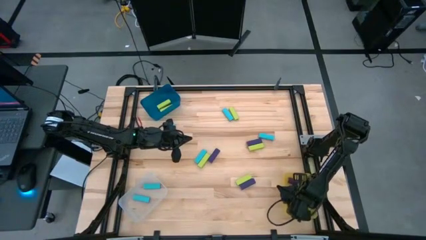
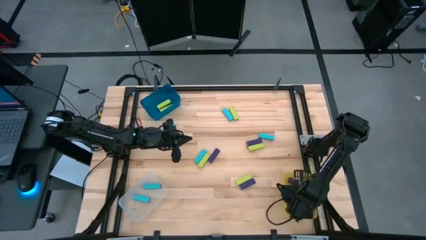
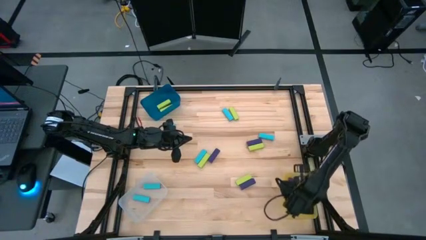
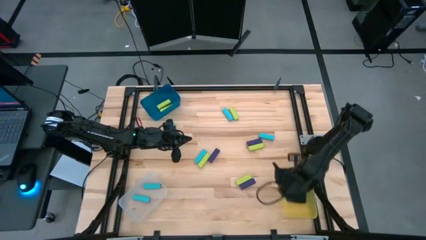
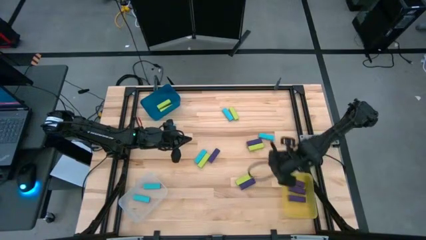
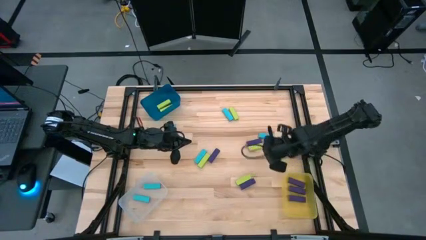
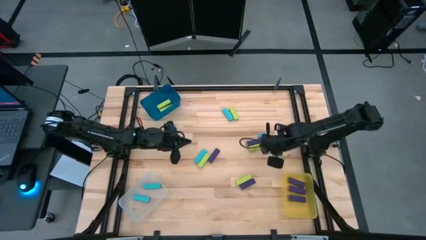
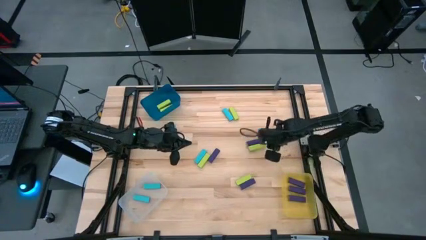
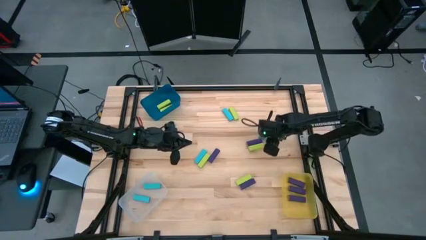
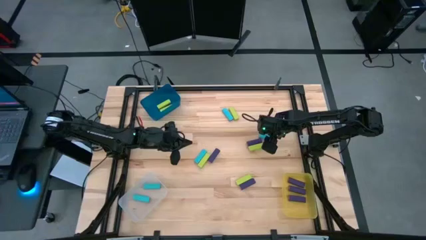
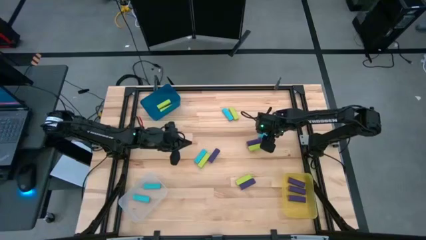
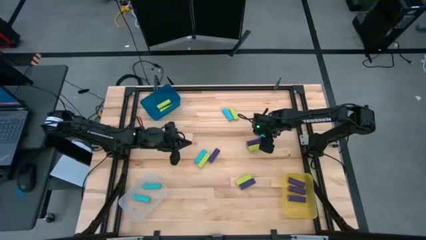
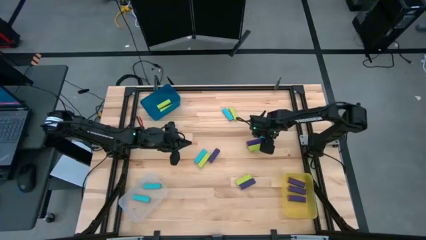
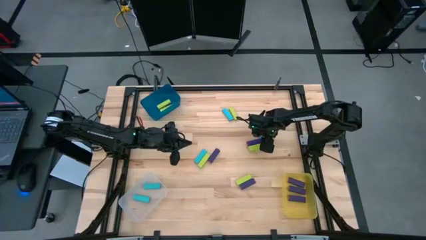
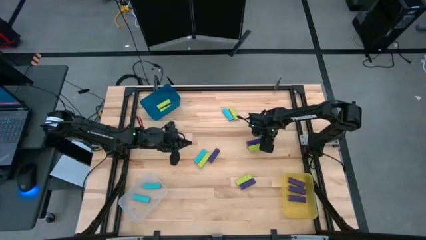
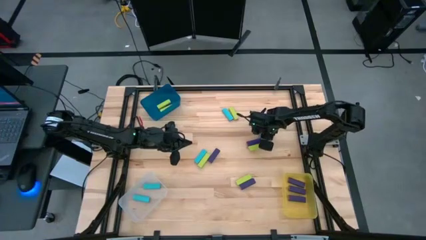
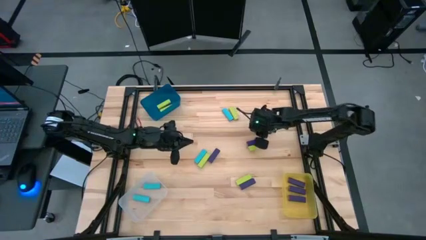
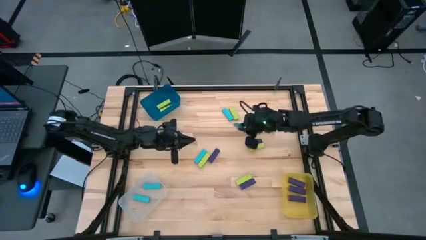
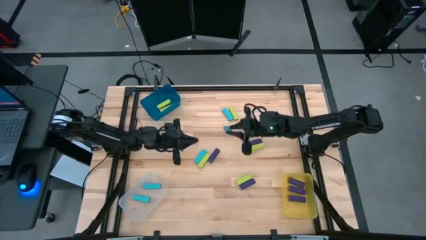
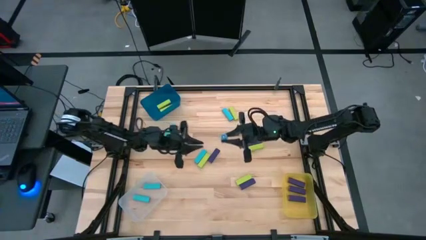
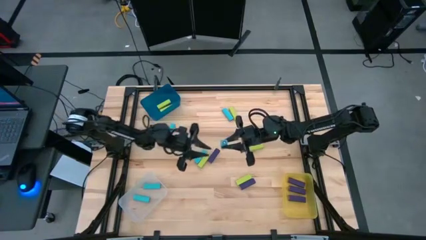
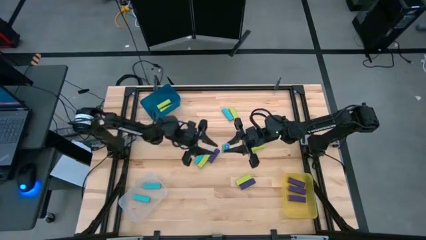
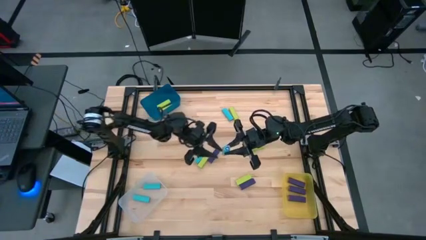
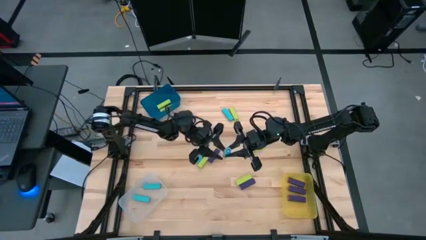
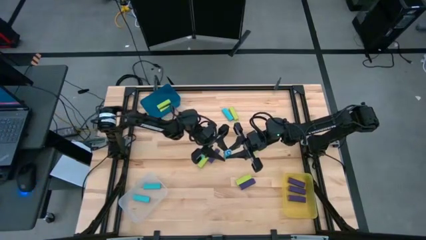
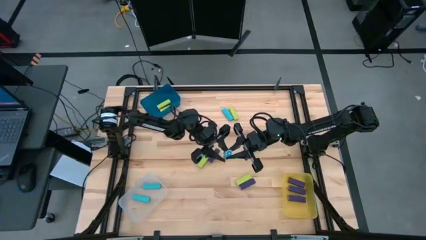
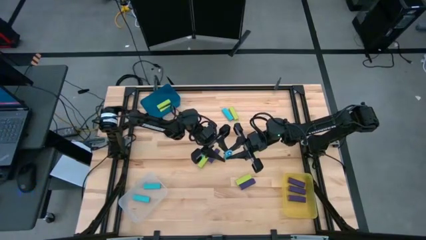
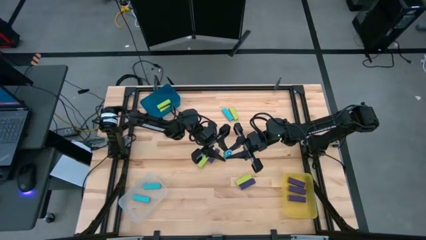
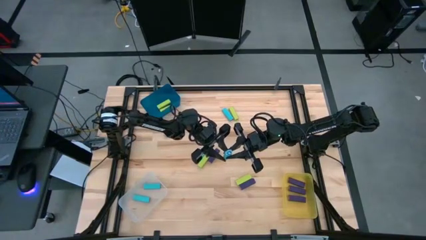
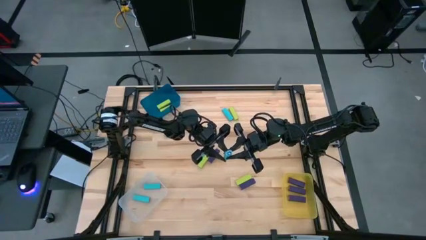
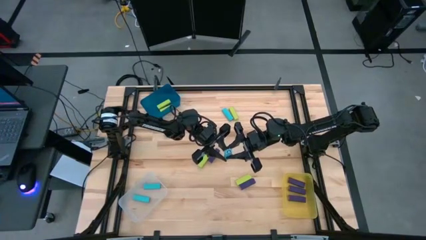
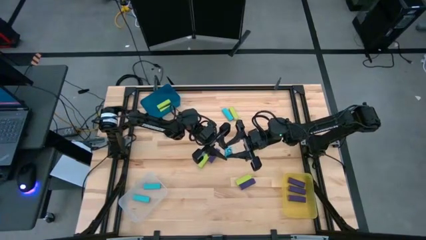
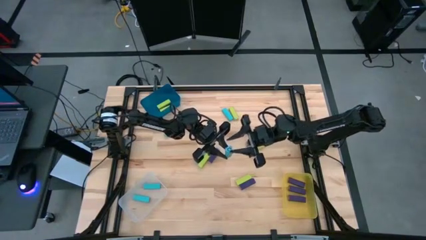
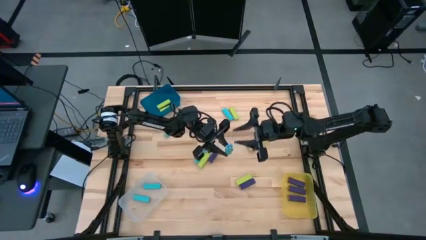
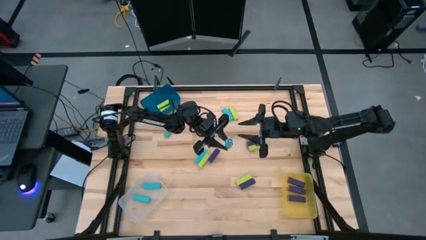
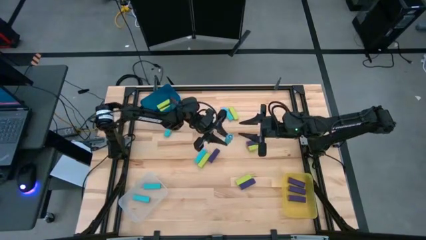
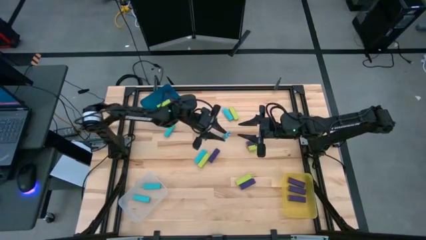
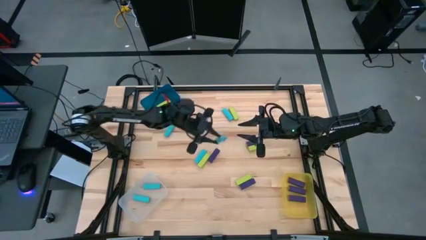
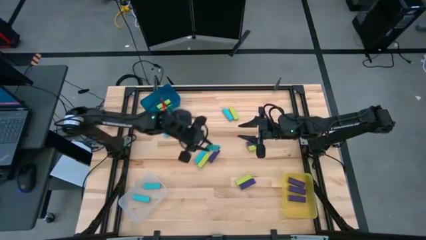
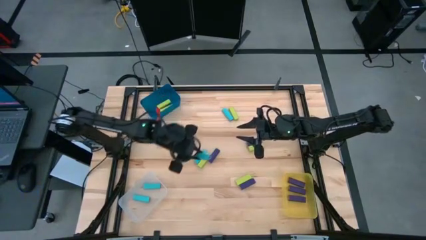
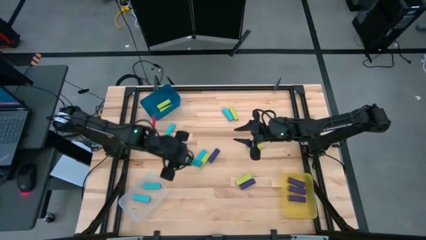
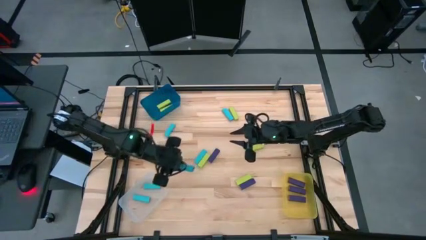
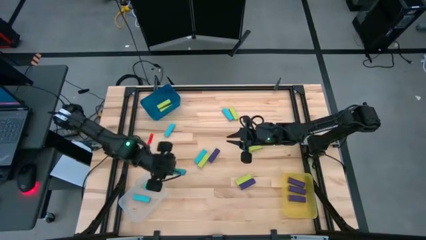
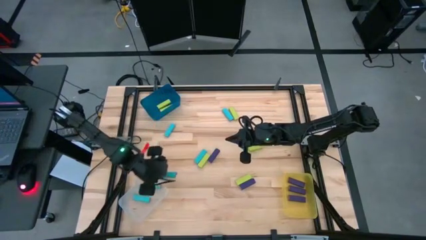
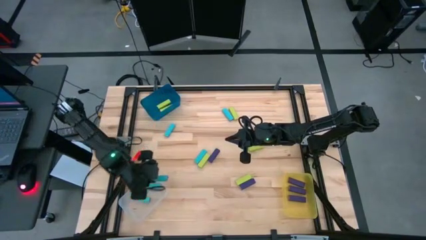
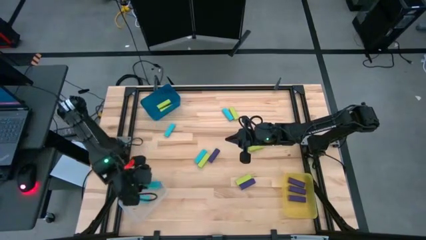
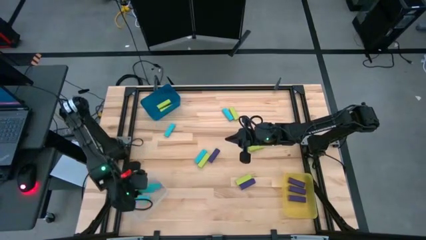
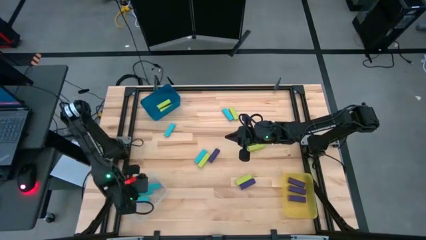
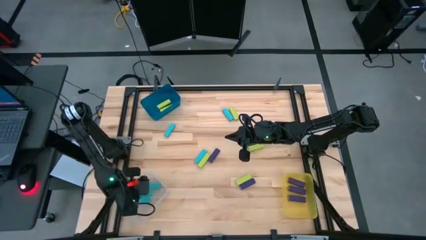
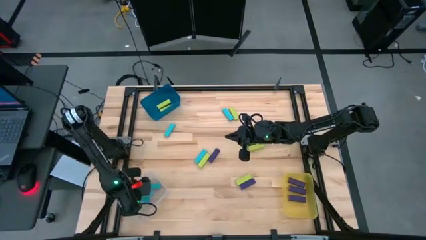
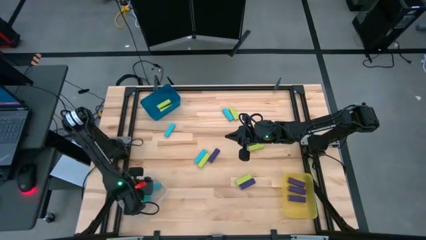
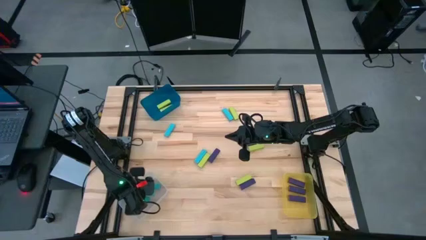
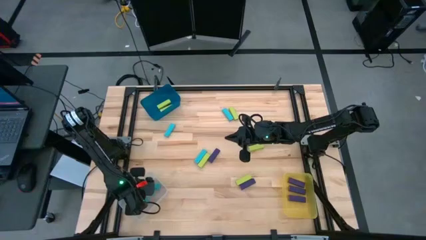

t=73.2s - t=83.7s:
Task: Sort blocks
Put the blue block into the transparent bin

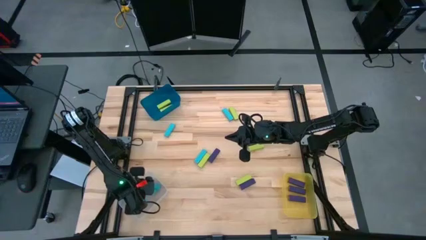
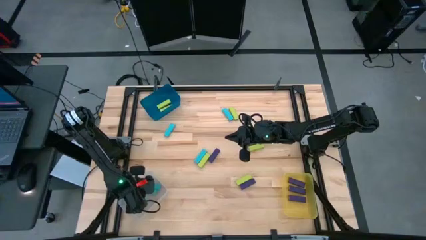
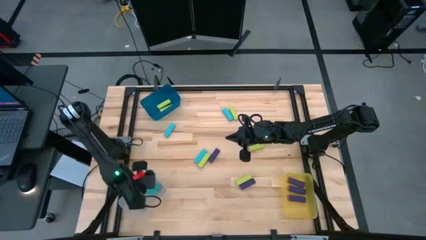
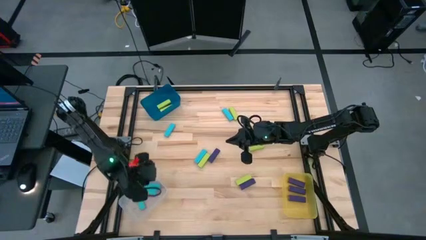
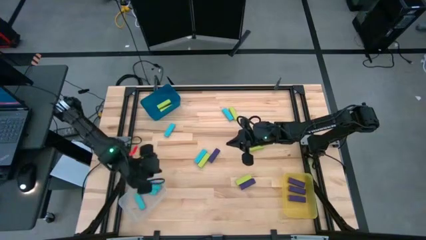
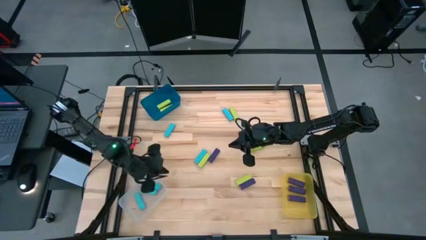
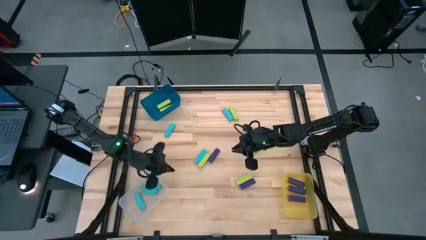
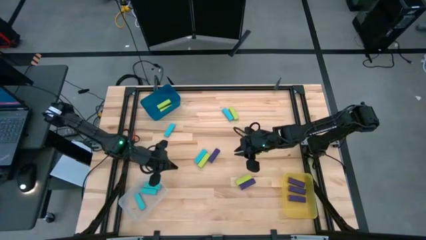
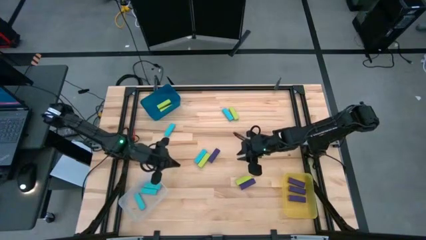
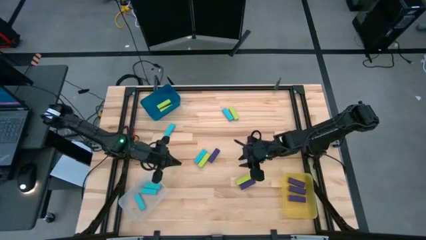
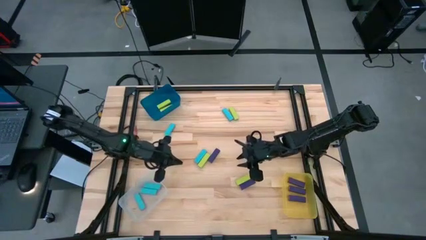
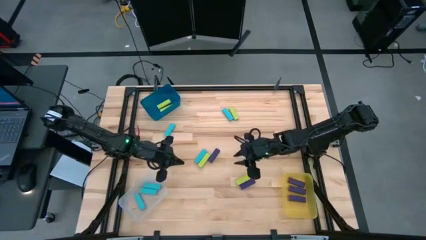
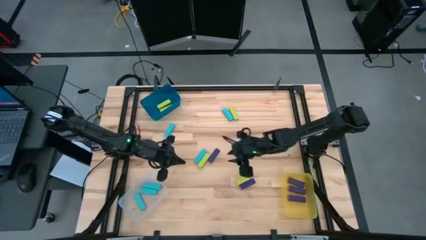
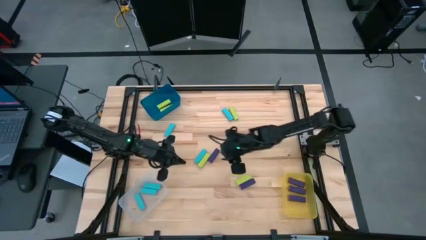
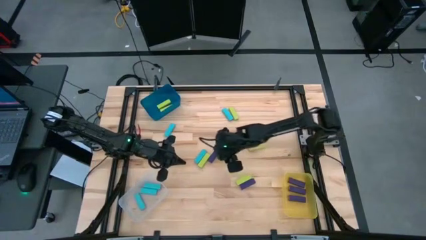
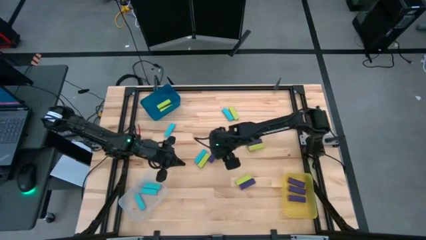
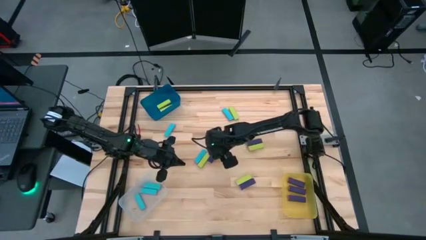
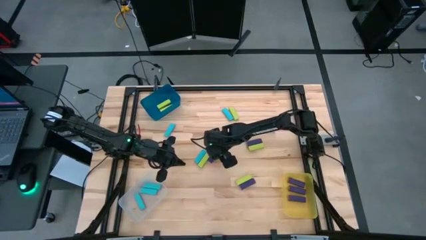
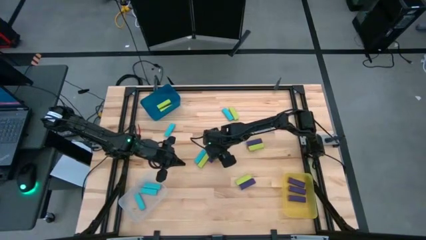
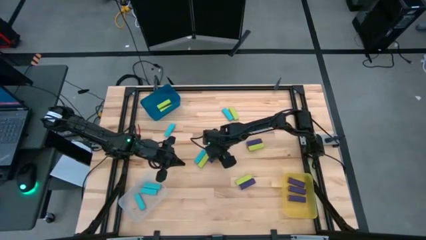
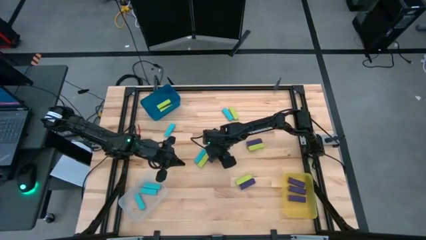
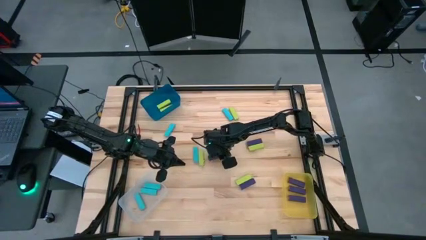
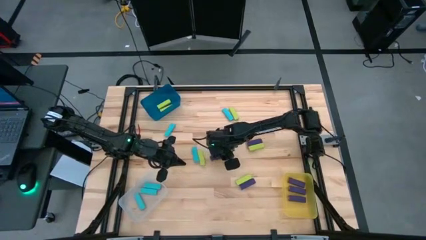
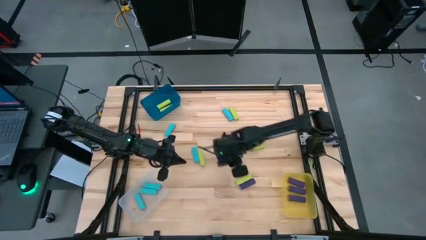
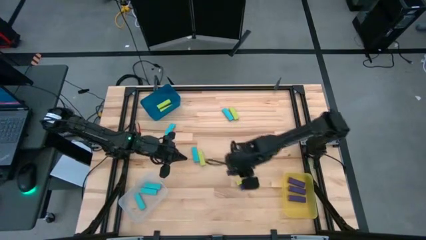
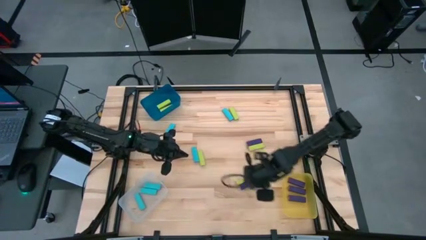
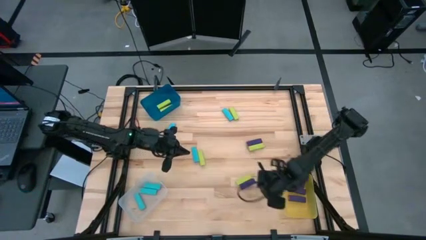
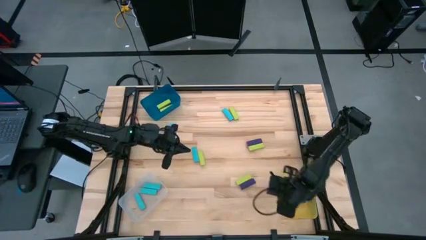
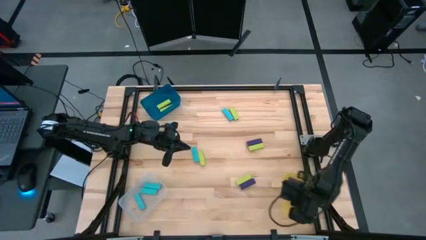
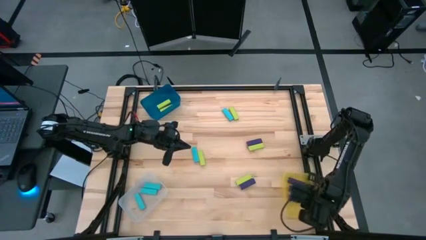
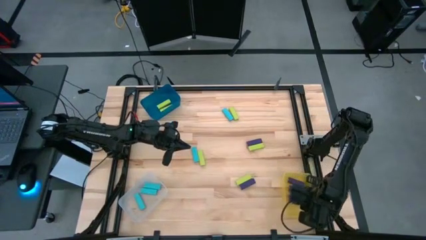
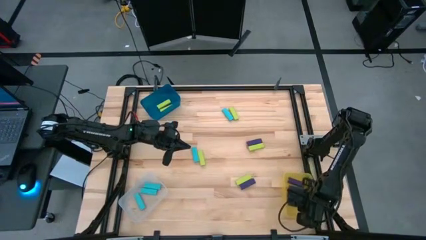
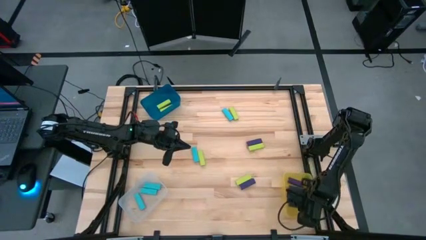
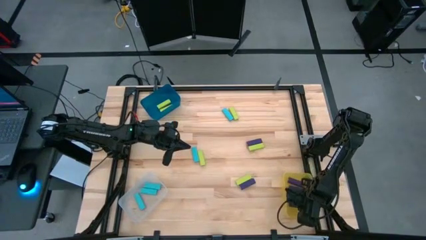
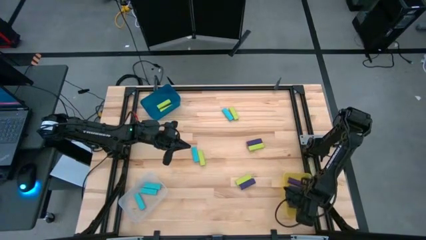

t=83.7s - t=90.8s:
Put the violet block into the yellow bin
